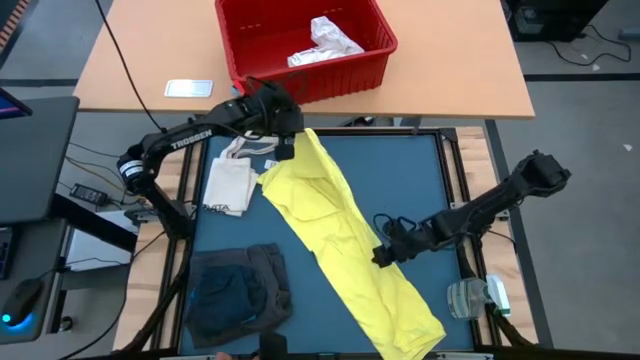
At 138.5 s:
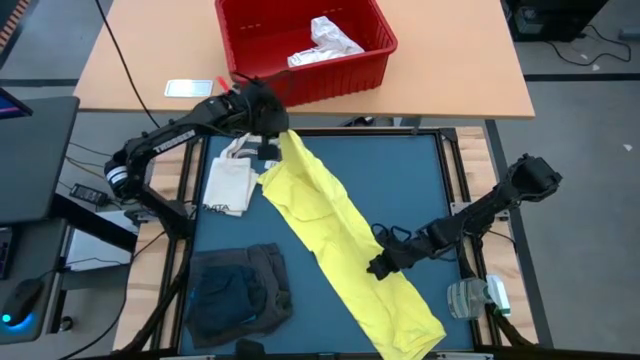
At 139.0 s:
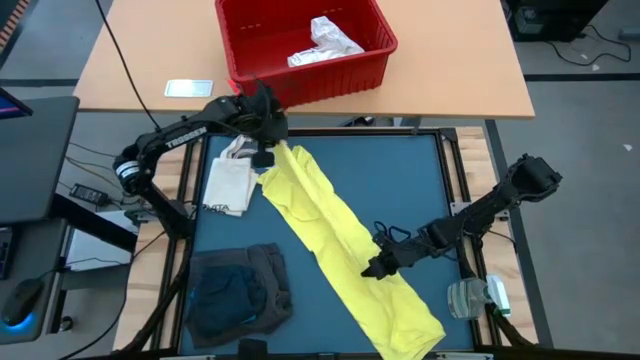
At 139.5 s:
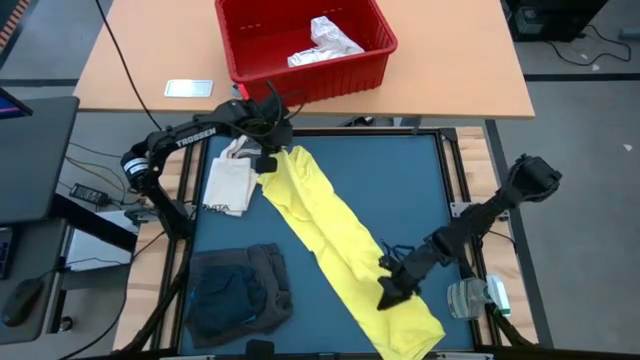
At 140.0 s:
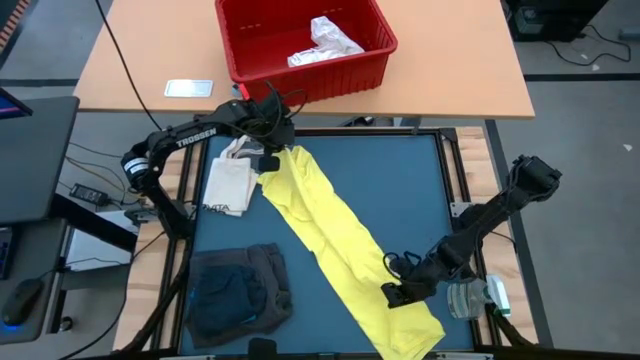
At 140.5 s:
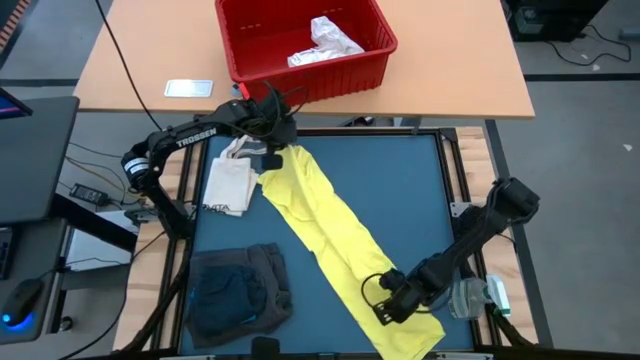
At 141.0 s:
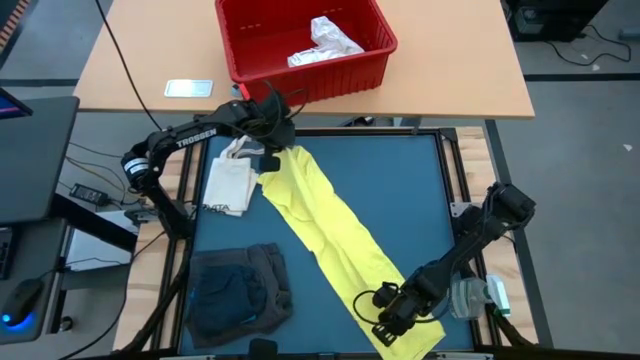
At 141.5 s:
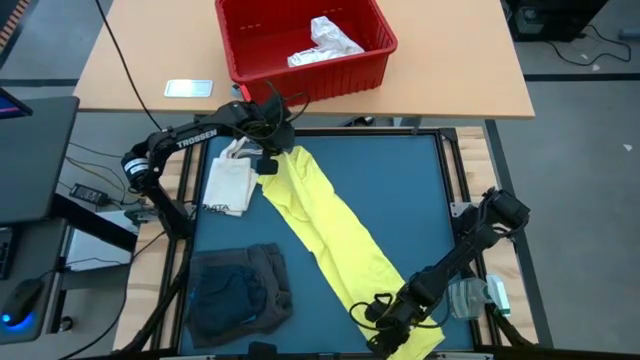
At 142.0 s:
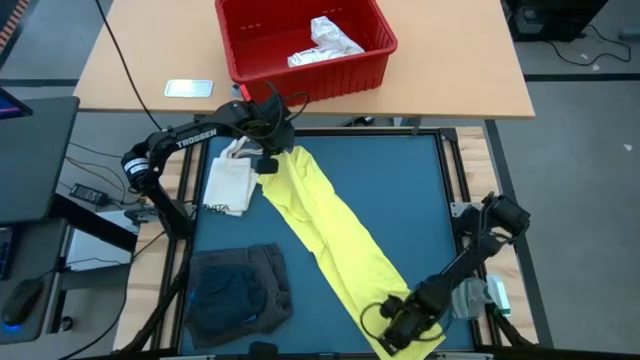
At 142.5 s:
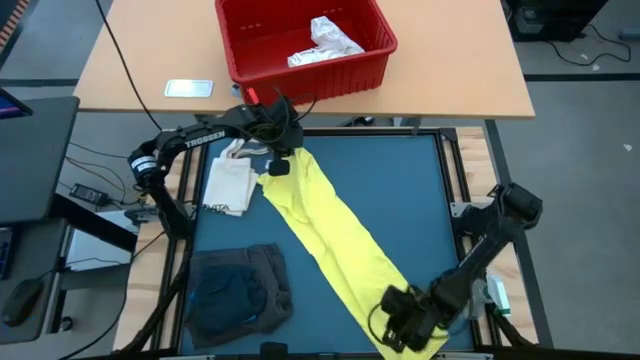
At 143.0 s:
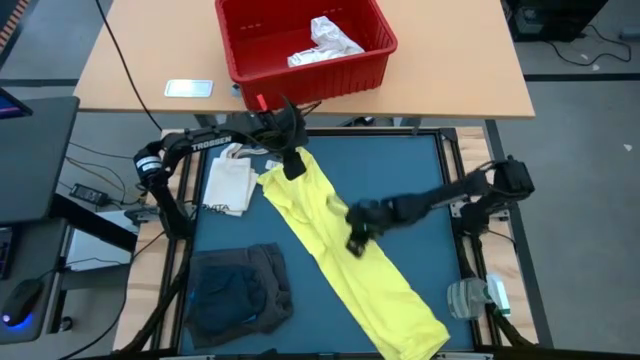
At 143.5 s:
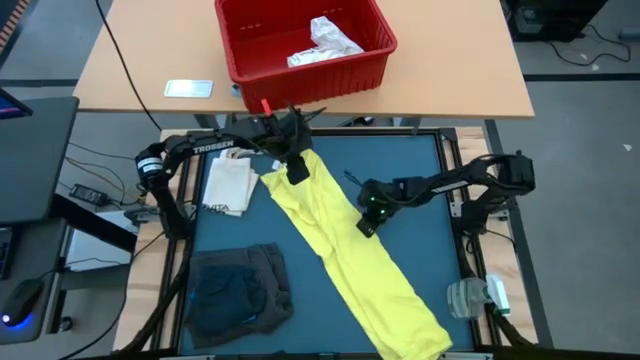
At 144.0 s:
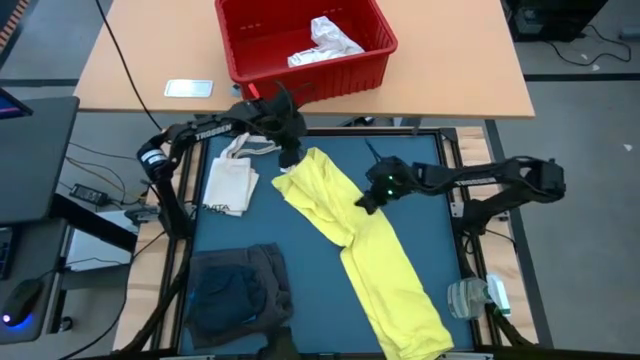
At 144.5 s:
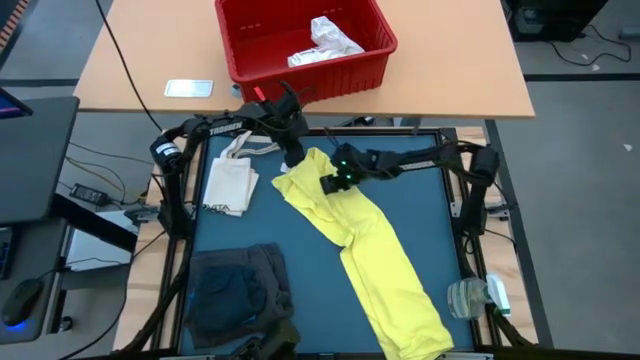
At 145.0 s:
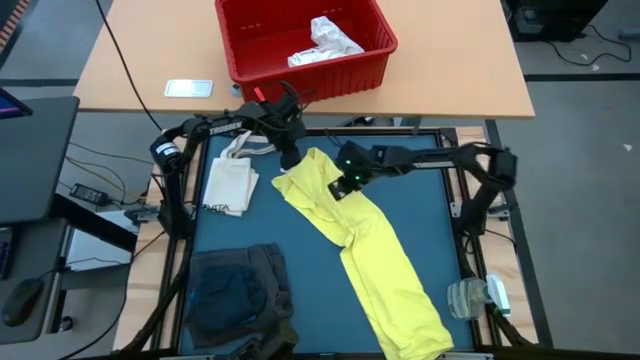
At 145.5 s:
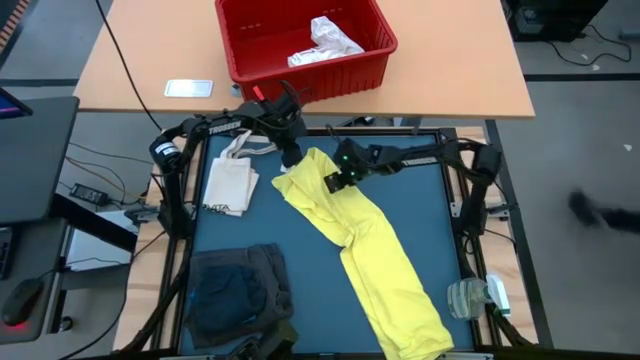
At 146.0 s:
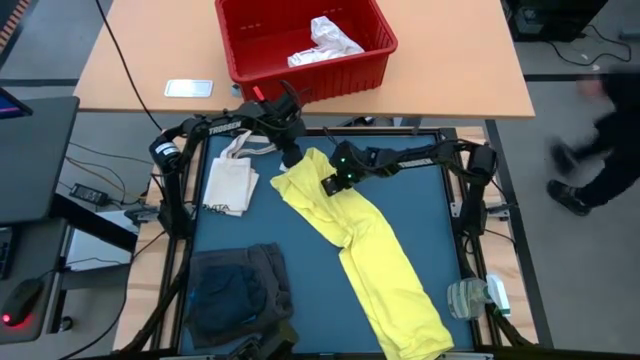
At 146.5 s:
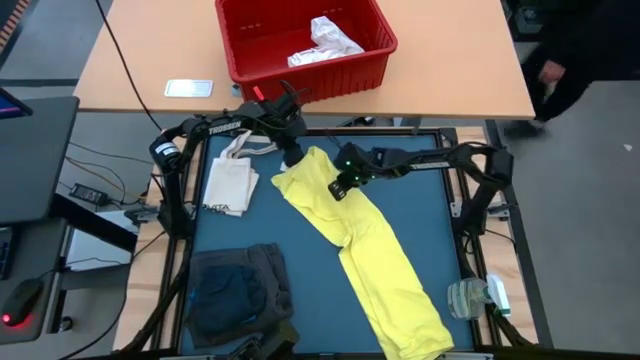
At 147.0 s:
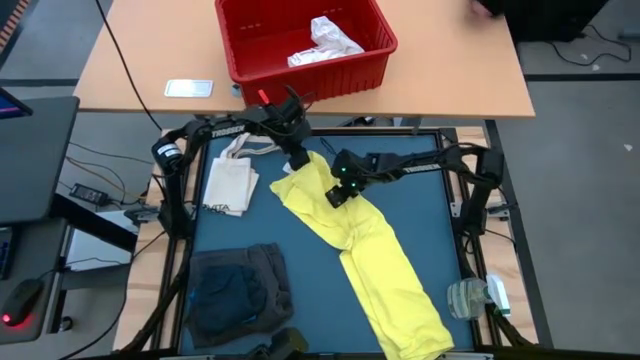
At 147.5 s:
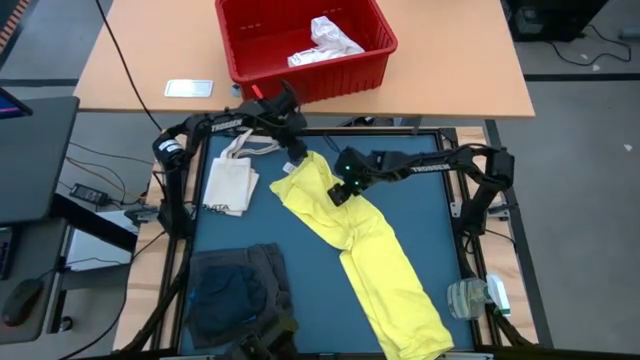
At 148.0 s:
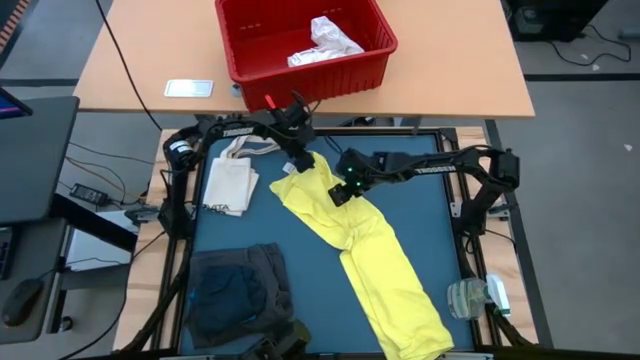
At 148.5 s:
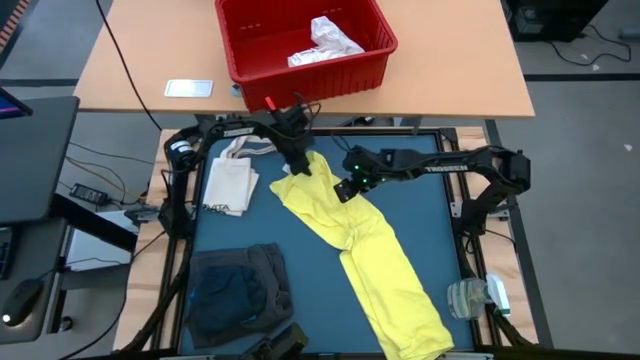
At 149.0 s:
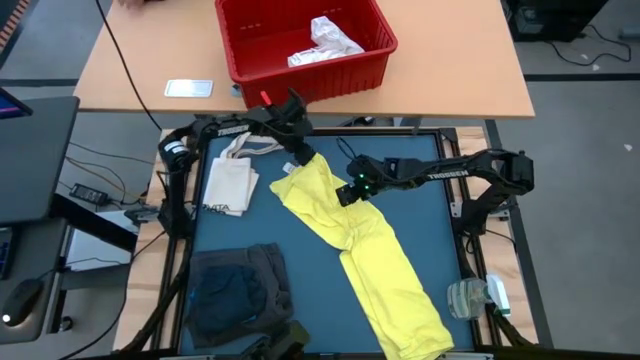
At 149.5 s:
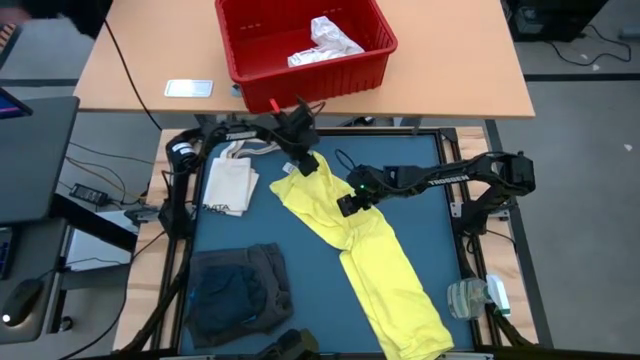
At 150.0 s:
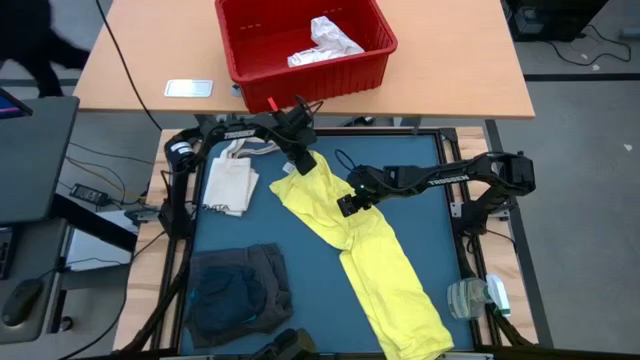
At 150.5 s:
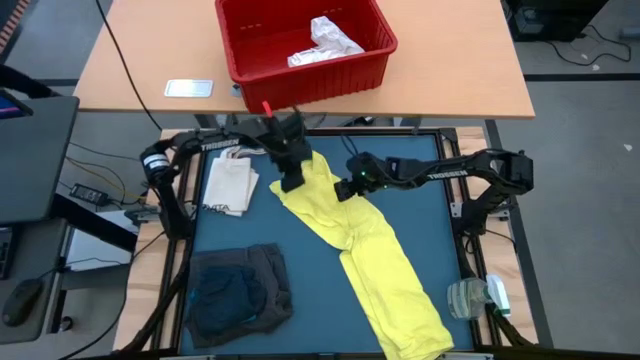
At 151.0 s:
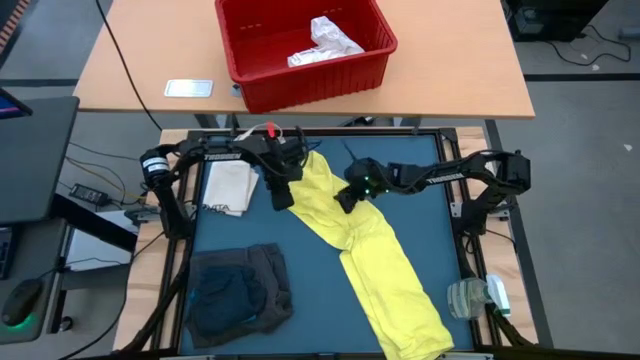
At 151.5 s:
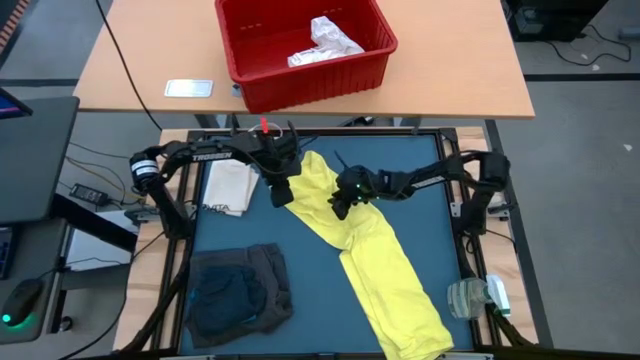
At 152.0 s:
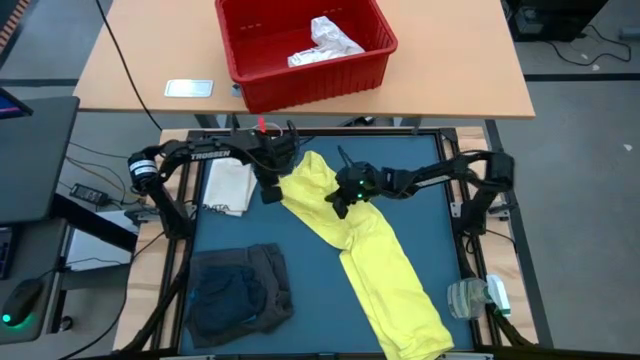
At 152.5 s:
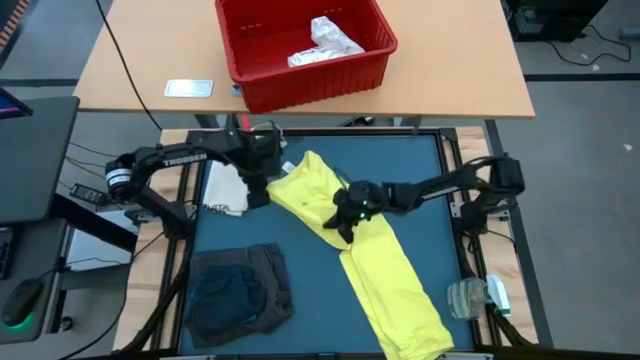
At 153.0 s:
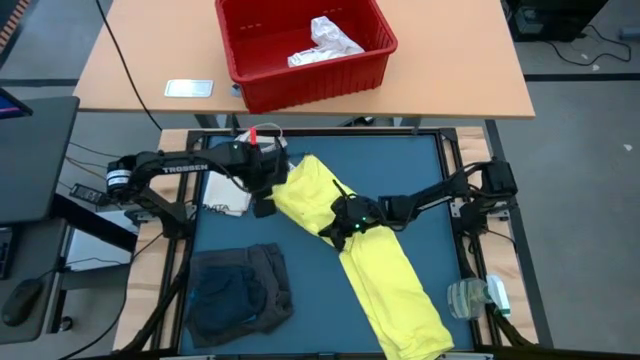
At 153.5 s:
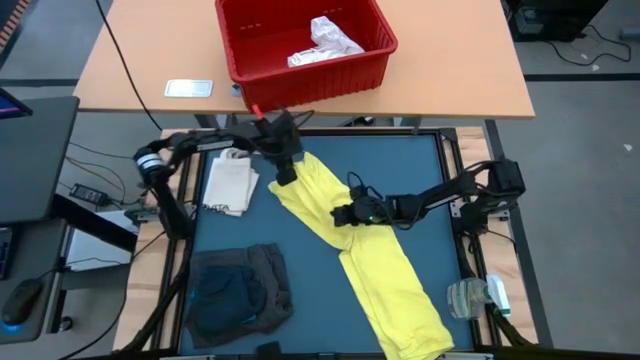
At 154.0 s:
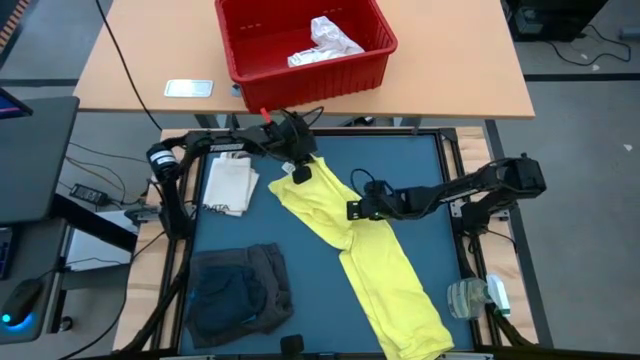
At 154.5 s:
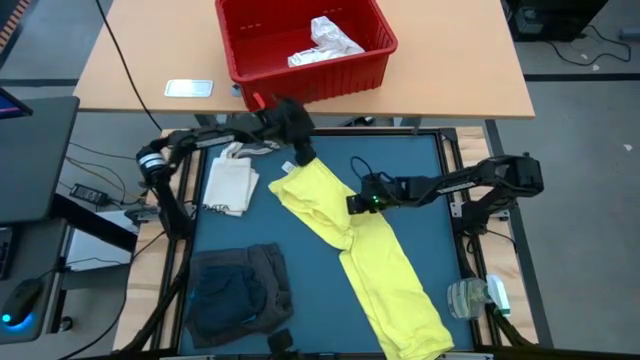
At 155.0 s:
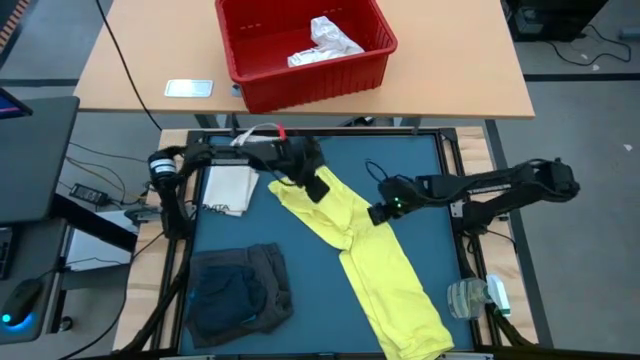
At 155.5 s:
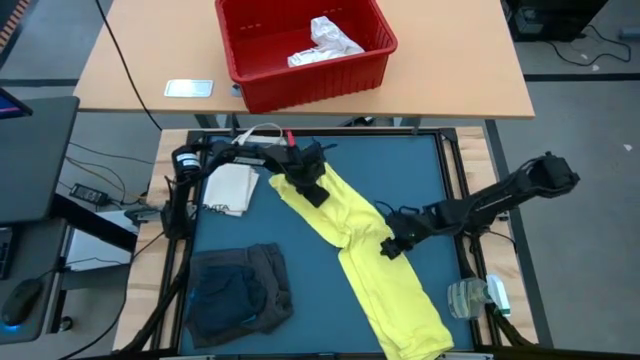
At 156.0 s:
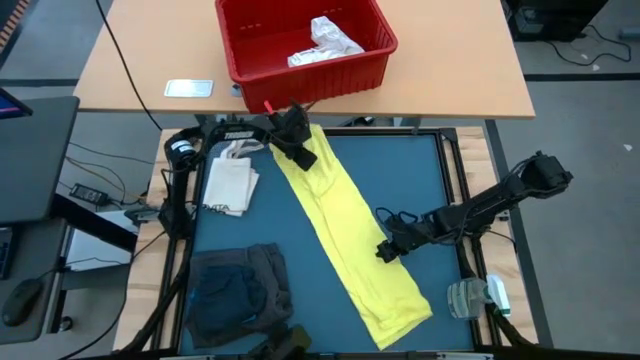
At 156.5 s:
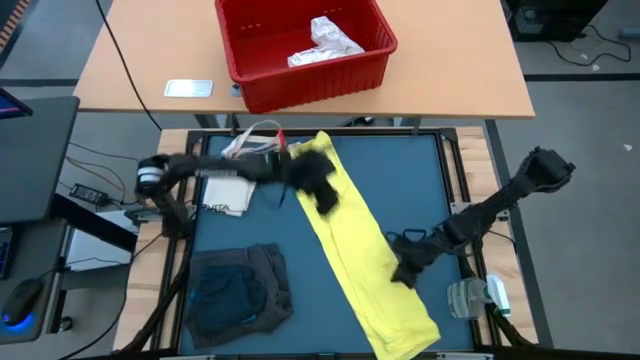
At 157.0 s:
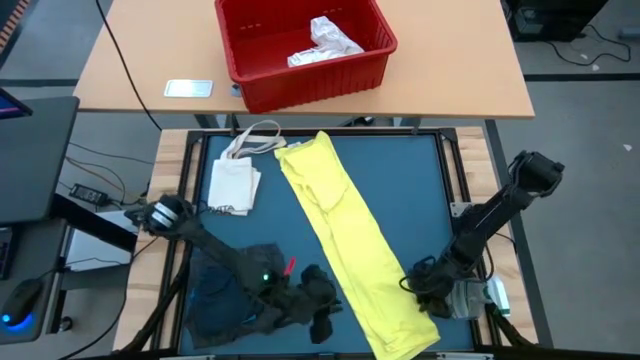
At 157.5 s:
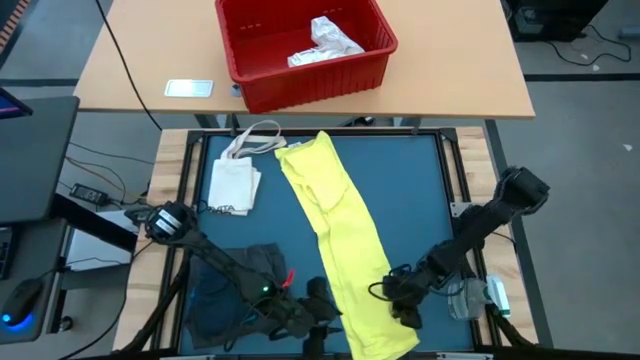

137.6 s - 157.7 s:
Task: Fold laundry
Fold the yellow shirt
